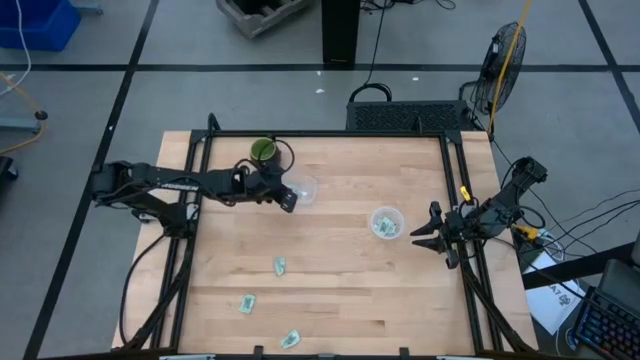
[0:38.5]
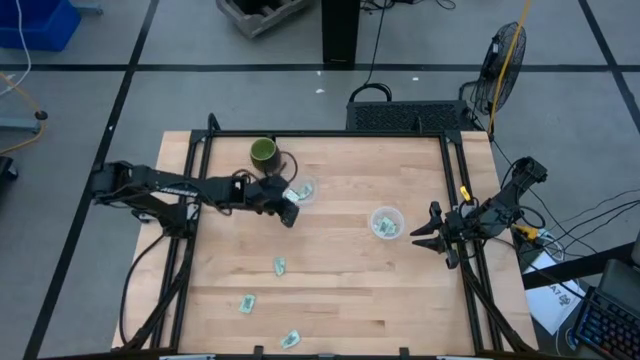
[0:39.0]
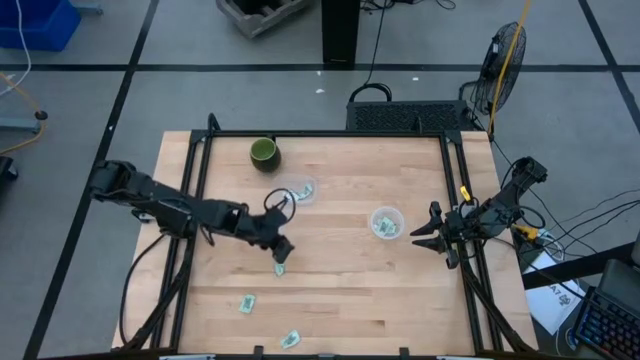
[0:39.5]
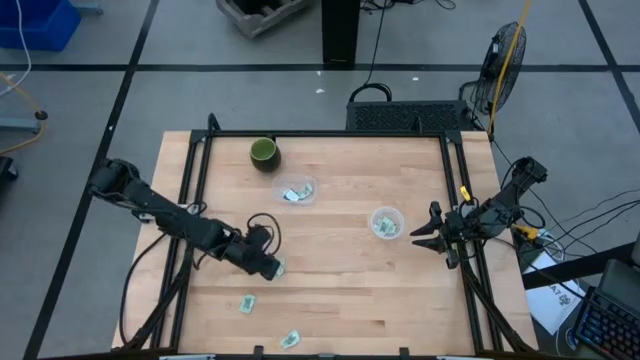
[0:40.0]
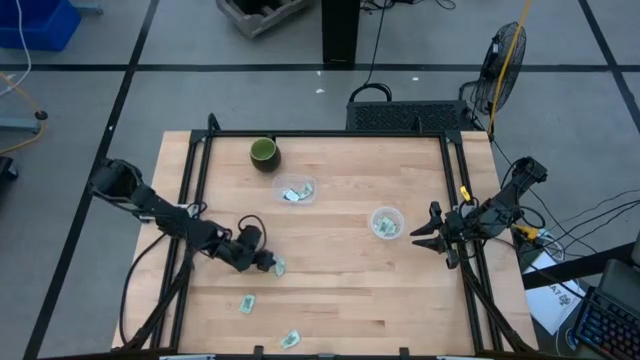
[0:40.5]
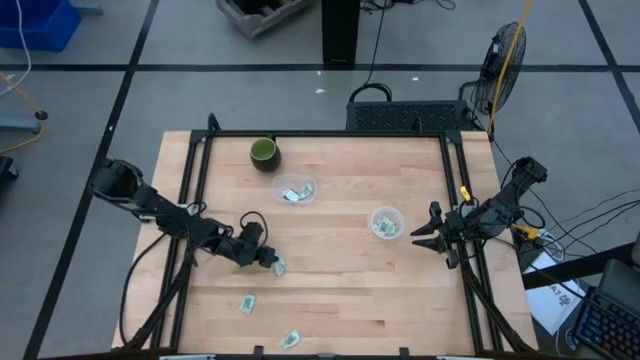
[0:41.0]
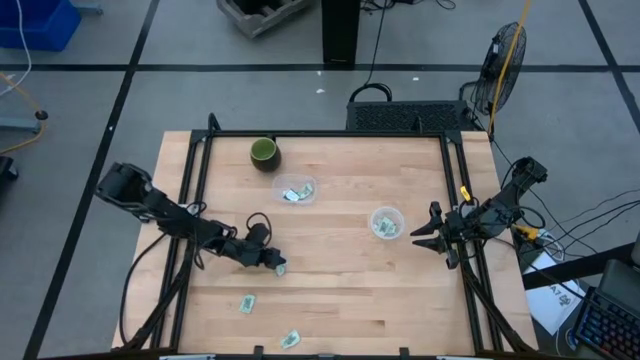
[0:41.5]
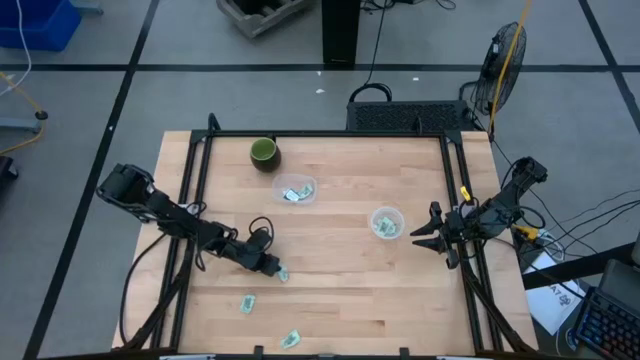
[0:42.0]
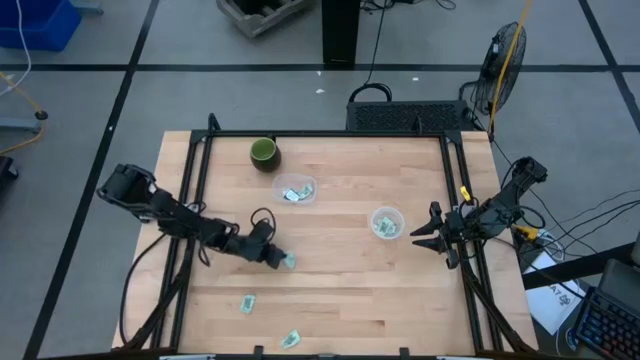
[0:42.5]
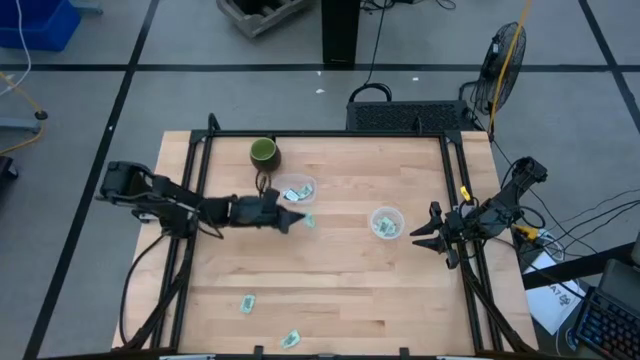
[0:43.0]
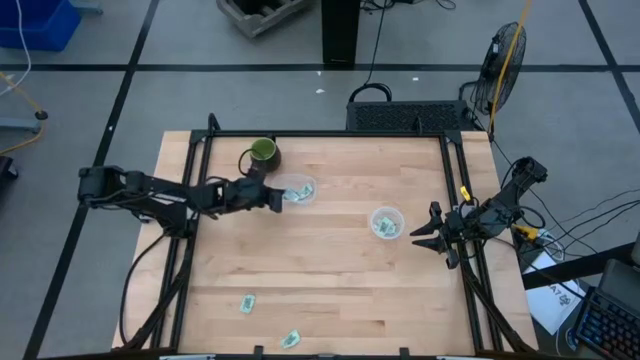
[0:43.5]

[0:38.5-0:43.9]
Task: Pick and place items into bin
Put the top light green stevia packet into the left transparent bin

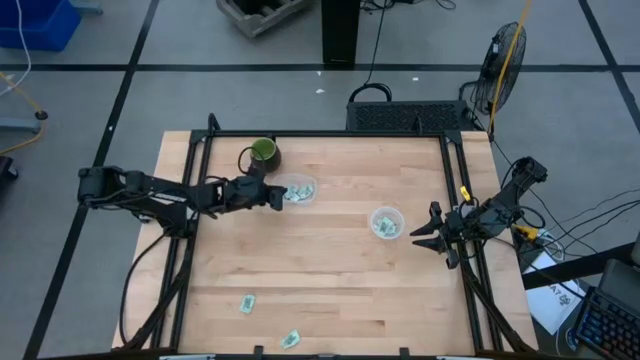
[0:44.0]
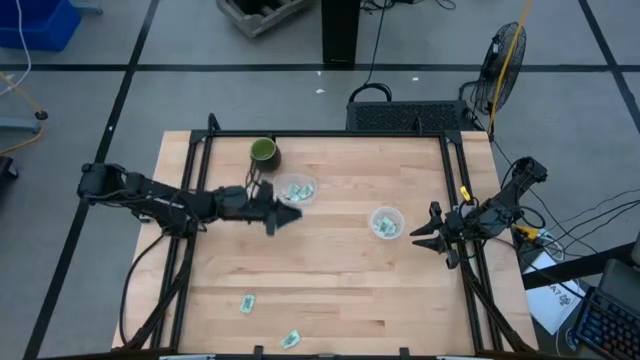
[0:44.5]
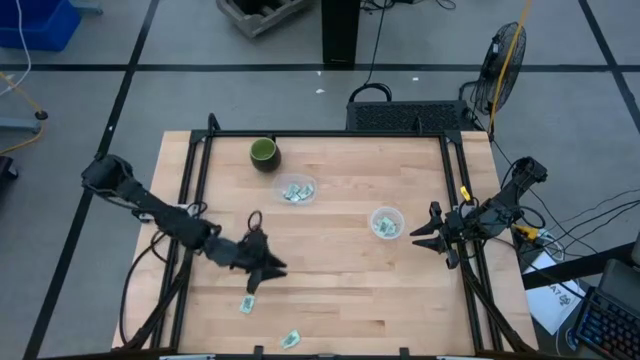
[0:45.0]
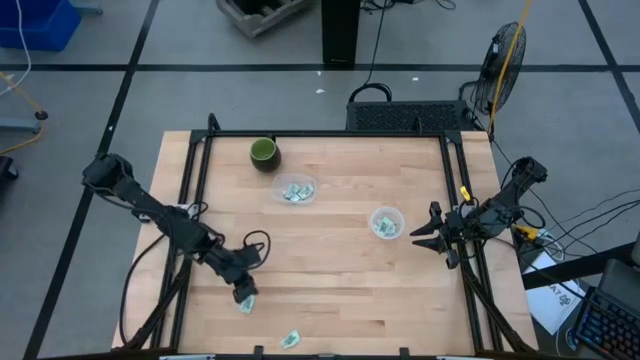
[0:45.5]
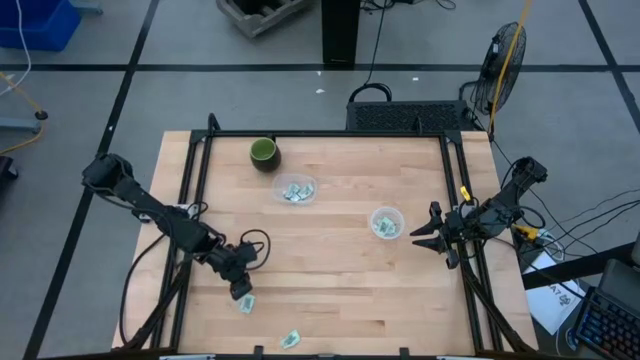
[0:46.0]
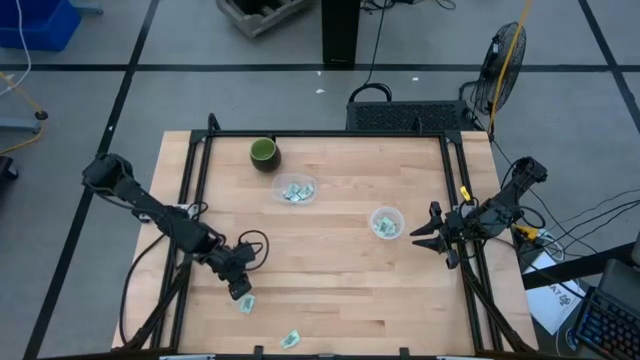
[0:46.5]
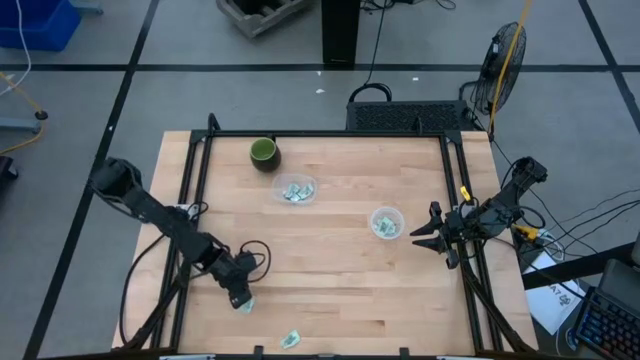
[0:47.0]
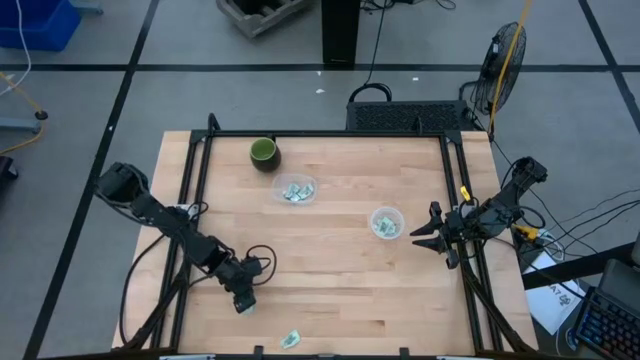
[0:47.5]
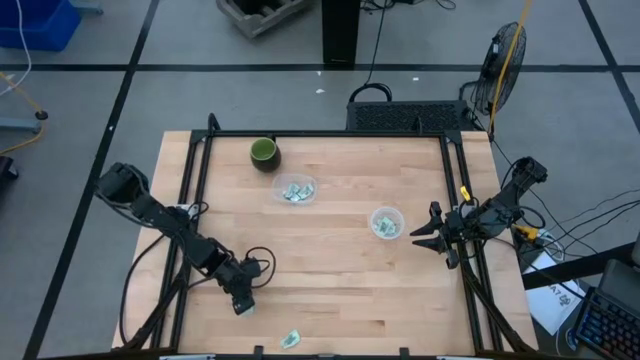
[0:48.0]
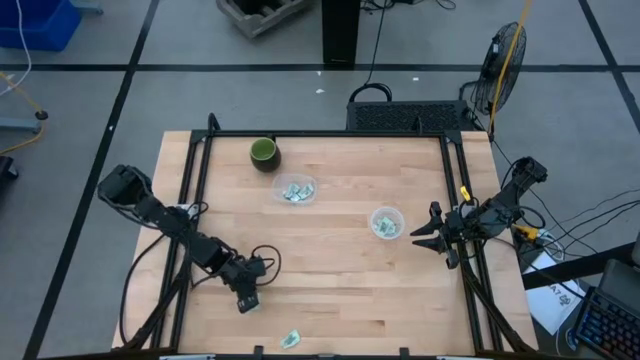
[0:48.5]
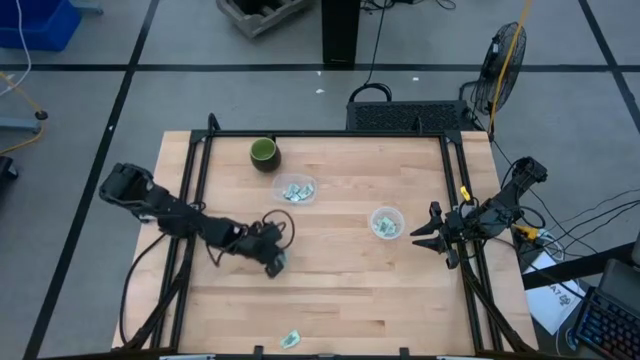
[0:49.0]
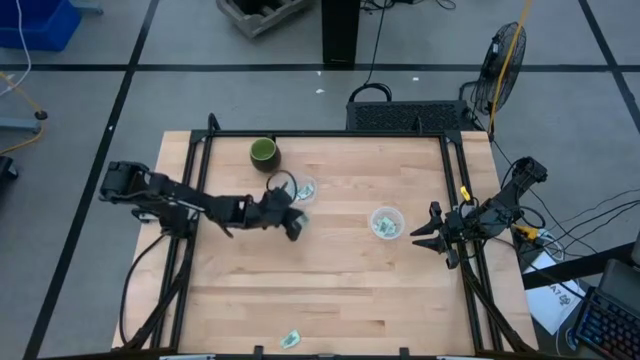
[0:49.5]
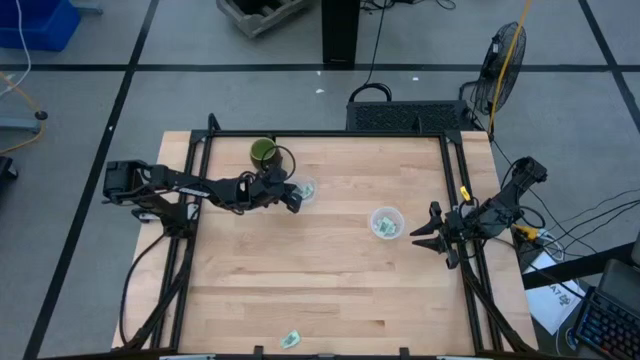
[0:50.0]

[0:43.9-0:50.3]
Put the top light green stevia packet into the left transparent bin

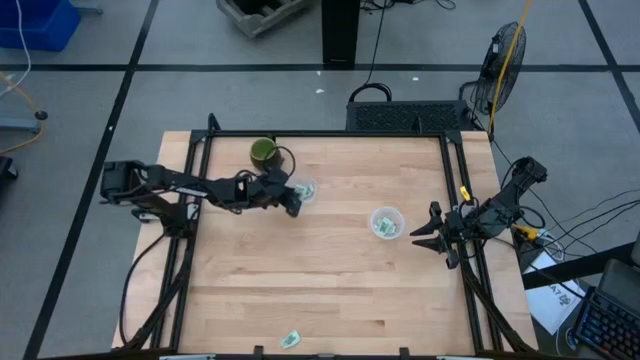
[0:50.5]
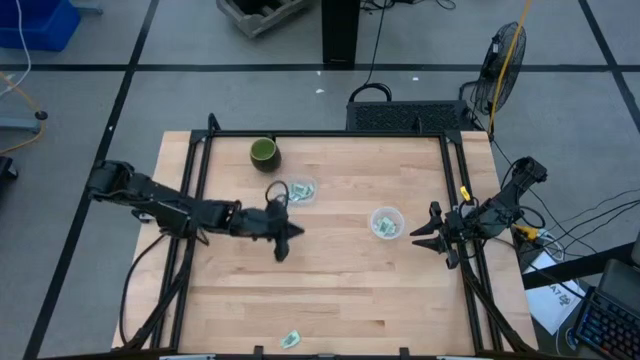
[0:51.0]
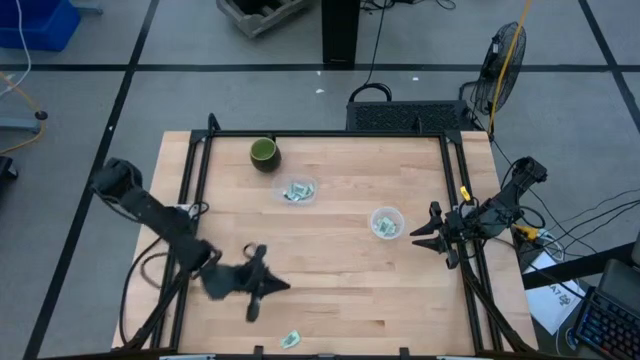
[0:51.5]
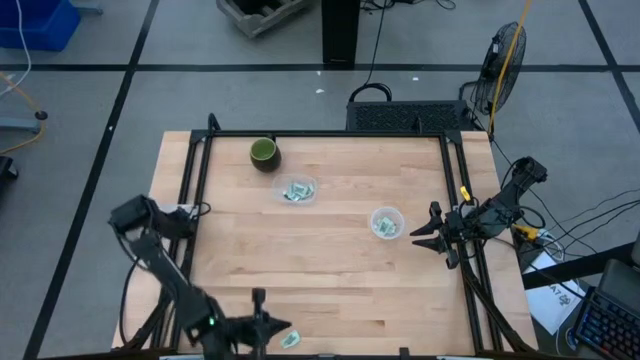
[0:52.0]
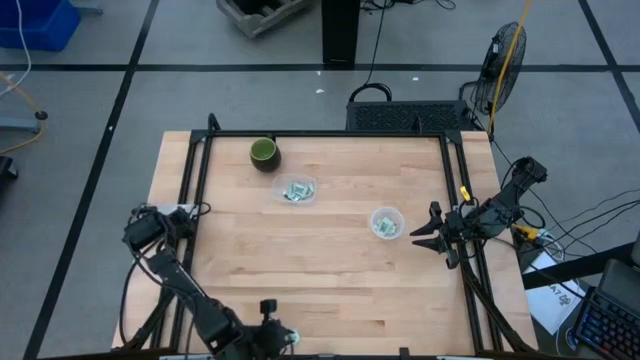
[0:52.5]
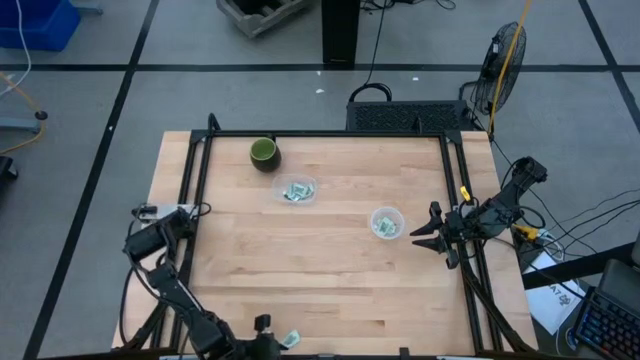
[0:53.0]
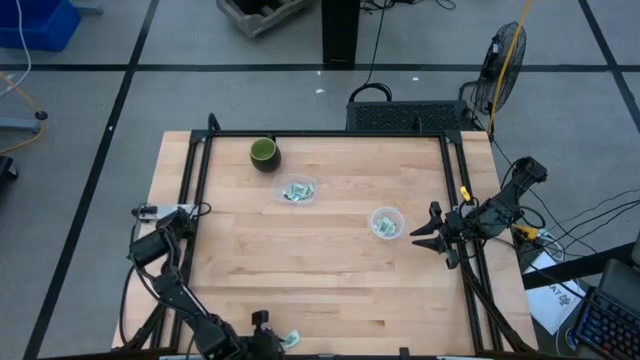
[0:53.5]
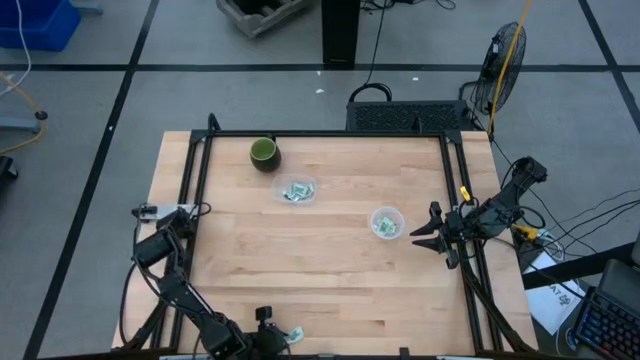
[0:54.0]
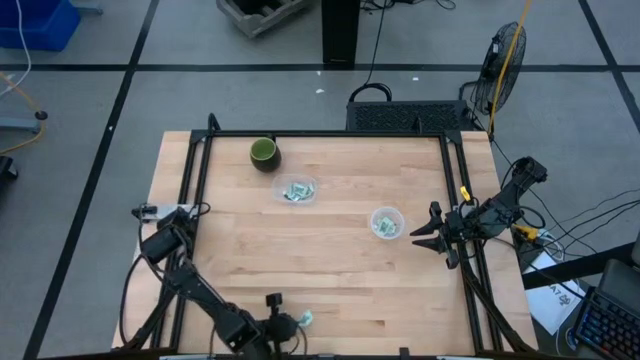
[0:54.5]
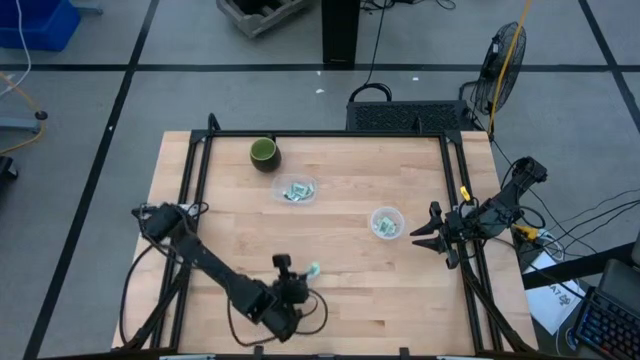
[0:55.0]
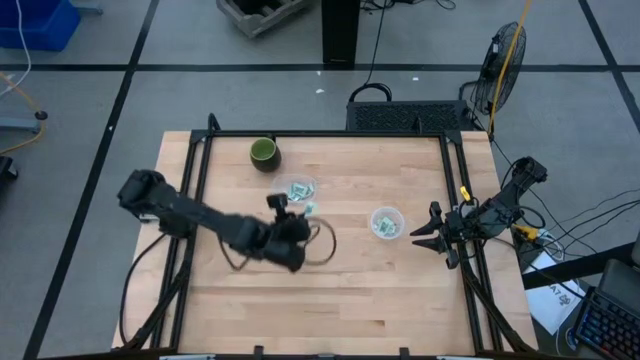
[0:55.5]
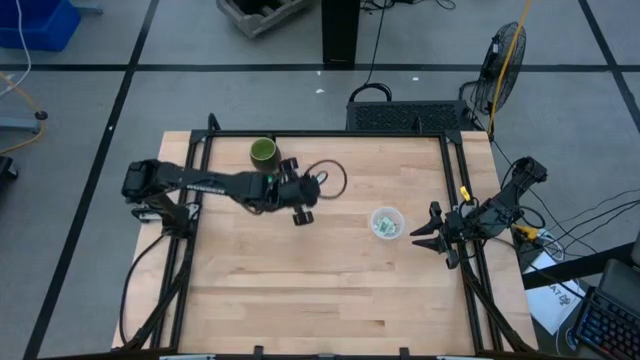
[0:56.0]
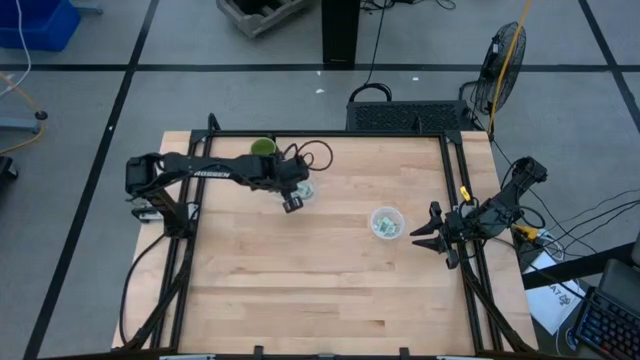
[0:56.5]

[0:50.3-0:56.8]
Put the light green stevia packet into the left transparent bin

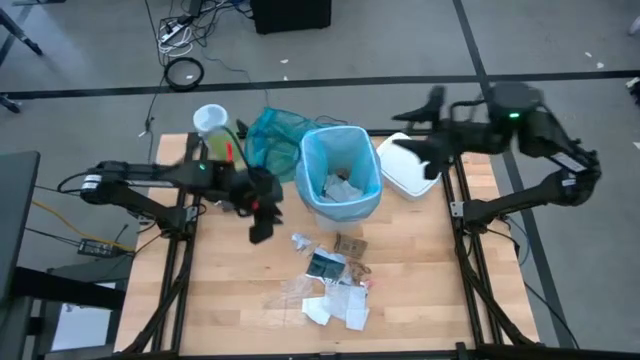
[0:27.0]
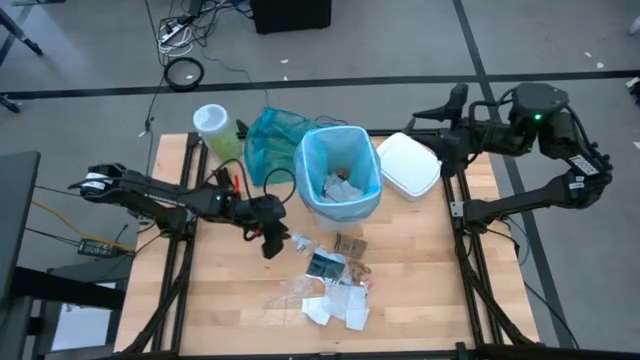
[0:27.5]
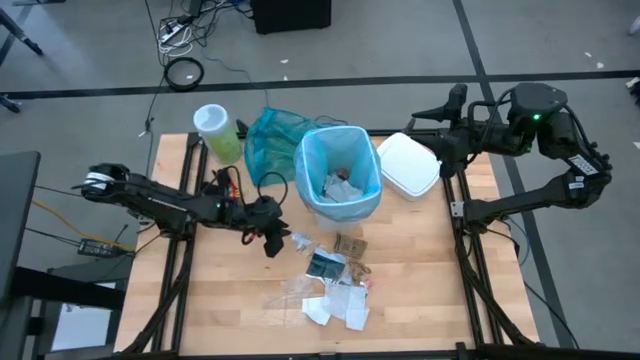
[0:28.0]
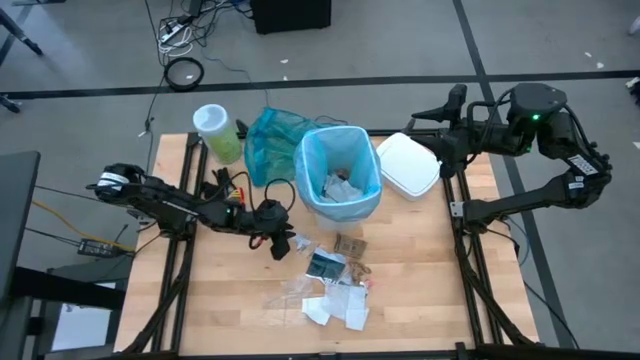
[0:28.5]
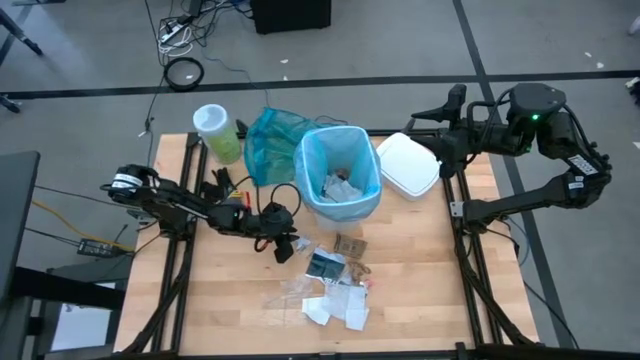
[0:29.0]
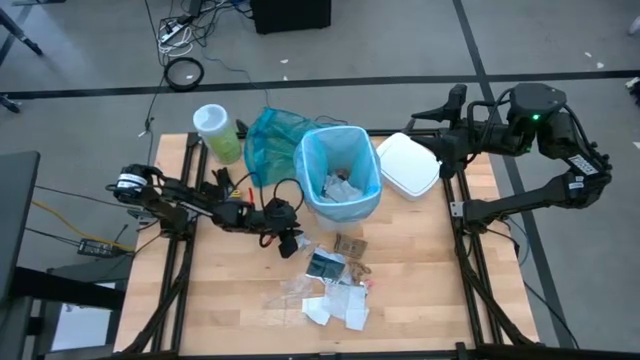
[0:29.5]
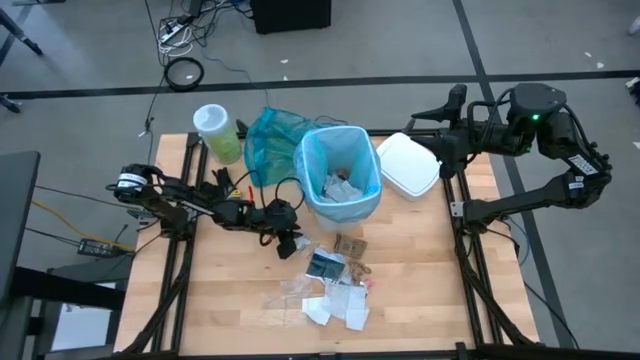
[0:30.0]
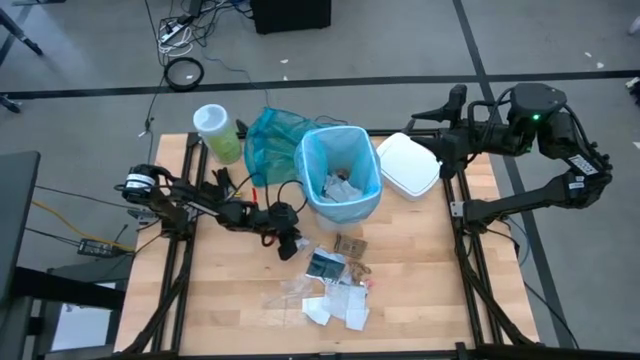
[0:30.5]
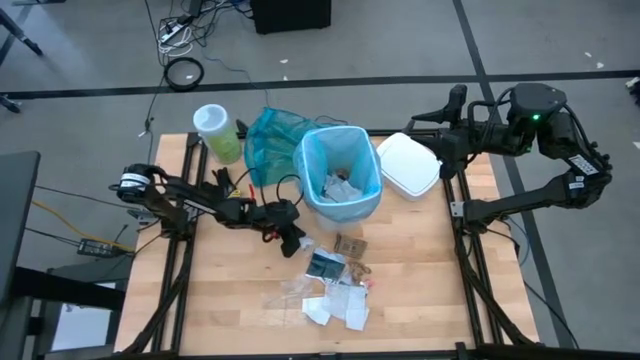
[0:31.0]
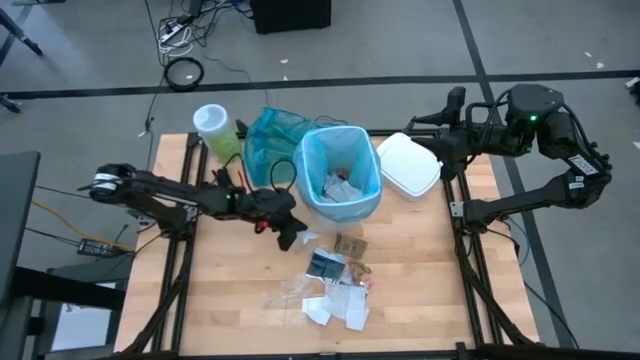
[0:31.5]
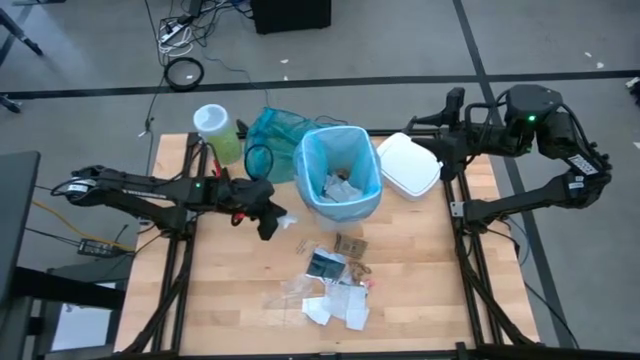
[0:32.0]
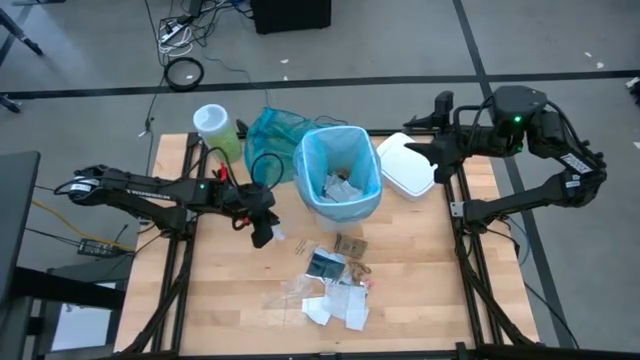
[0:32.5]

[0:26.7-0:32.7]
Task: place trash/remove bag and relplace
Put the clear plastic into the white trash bin
